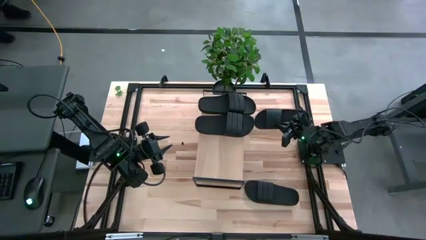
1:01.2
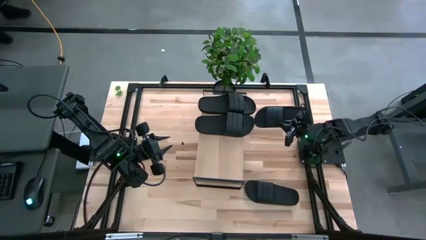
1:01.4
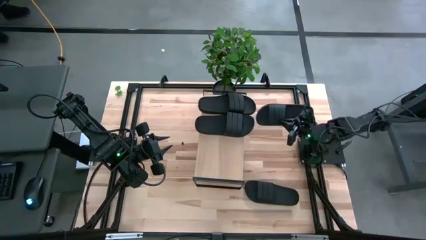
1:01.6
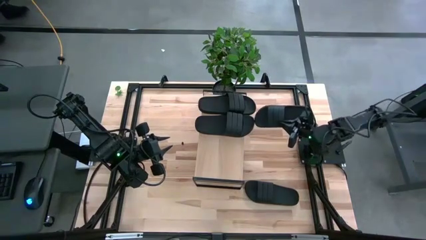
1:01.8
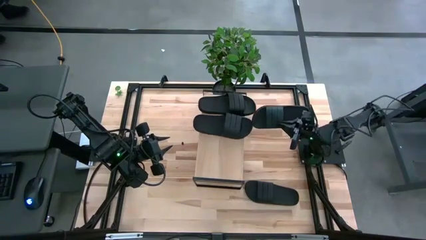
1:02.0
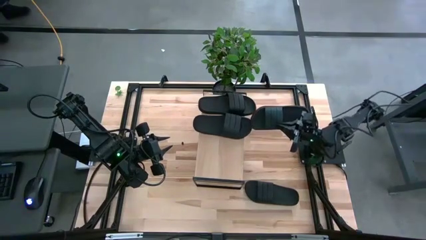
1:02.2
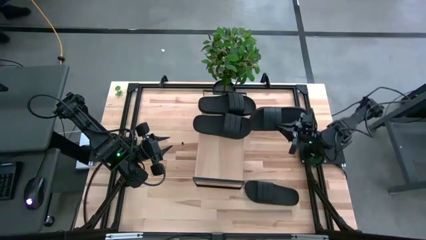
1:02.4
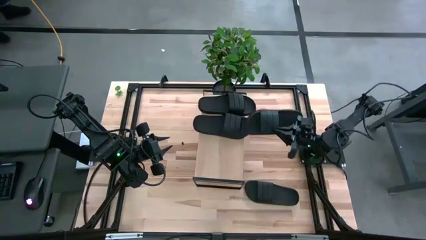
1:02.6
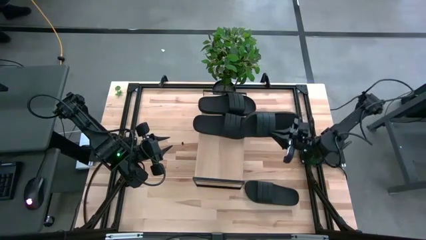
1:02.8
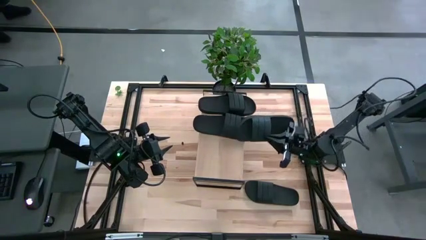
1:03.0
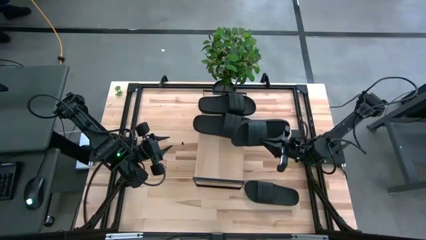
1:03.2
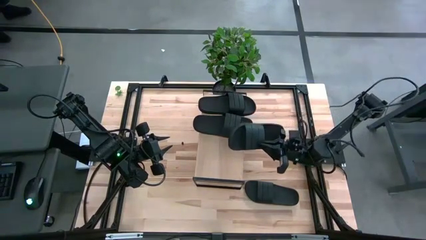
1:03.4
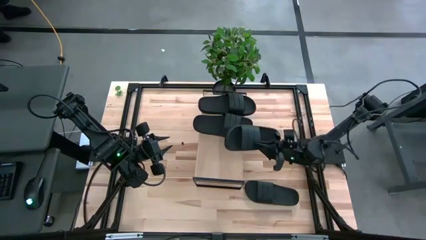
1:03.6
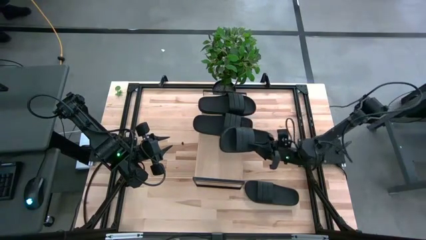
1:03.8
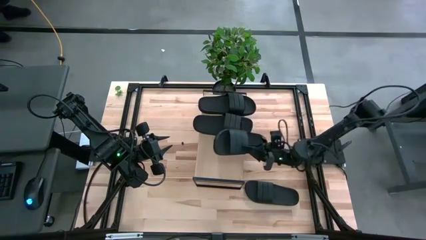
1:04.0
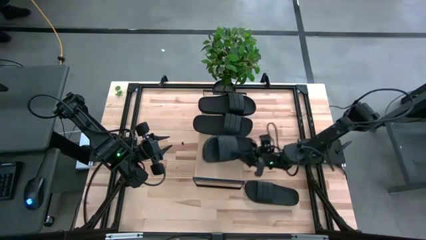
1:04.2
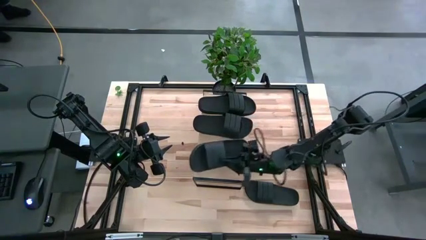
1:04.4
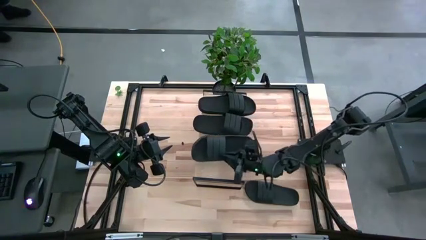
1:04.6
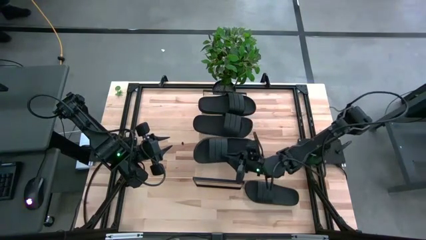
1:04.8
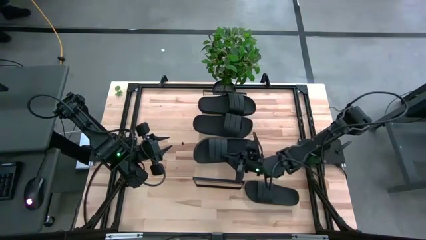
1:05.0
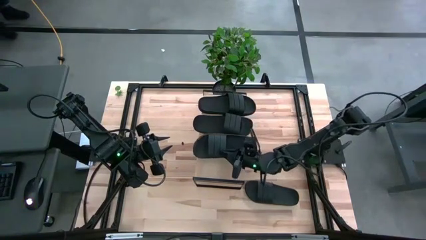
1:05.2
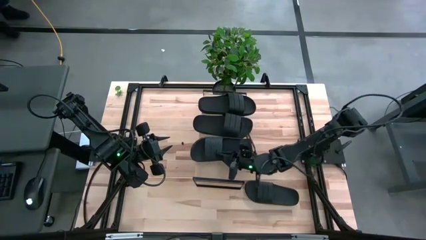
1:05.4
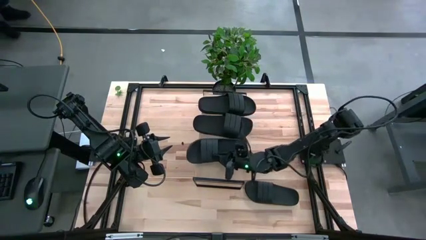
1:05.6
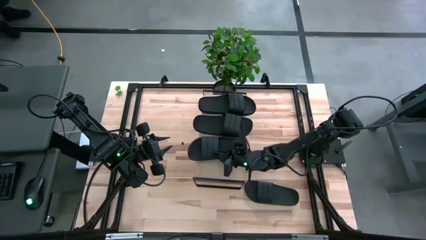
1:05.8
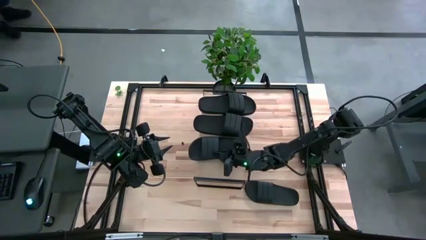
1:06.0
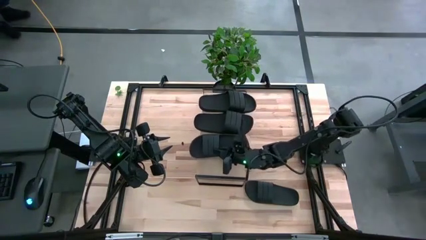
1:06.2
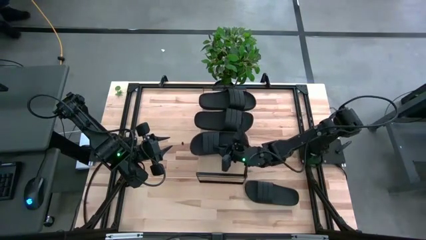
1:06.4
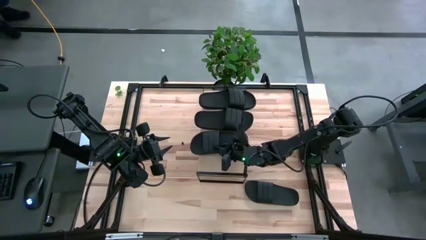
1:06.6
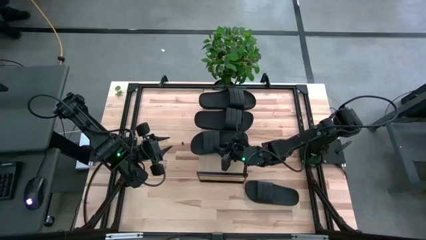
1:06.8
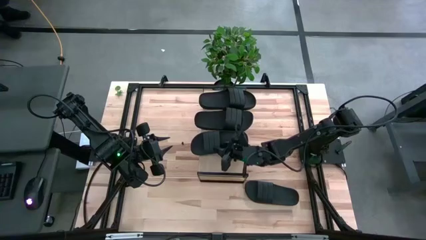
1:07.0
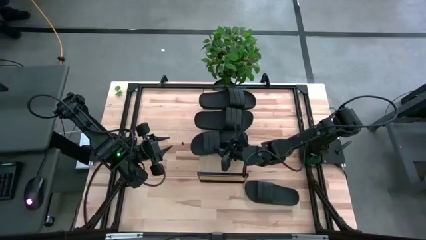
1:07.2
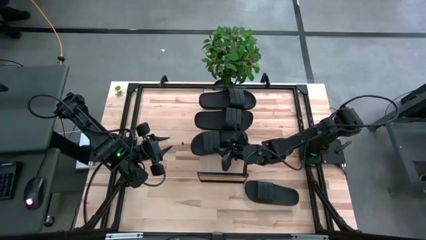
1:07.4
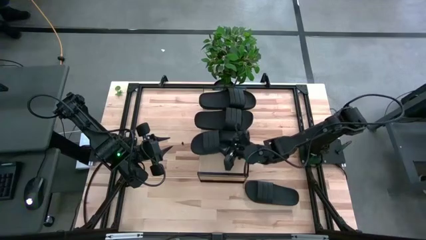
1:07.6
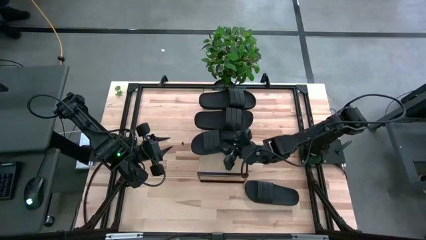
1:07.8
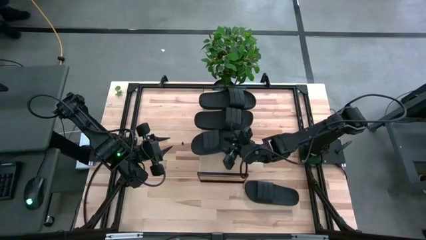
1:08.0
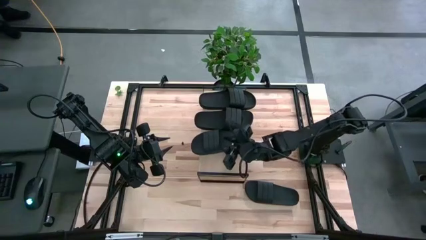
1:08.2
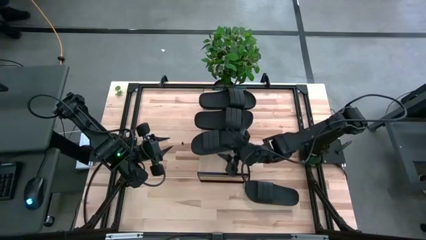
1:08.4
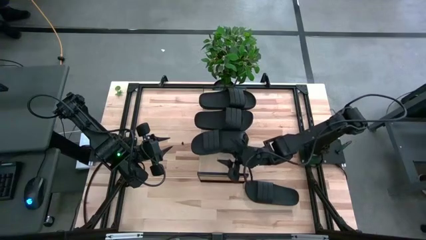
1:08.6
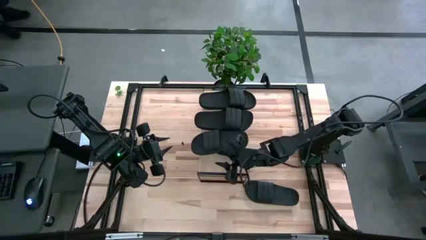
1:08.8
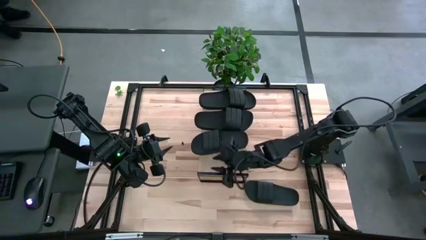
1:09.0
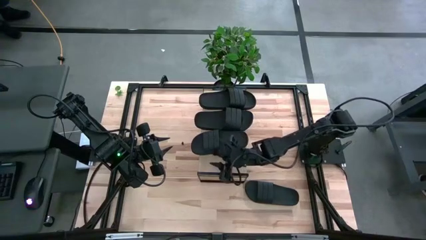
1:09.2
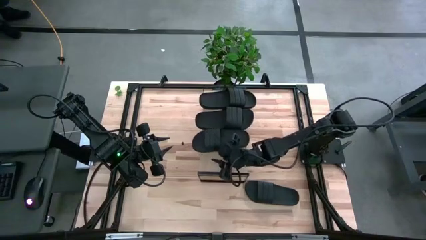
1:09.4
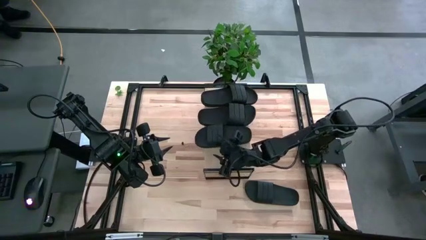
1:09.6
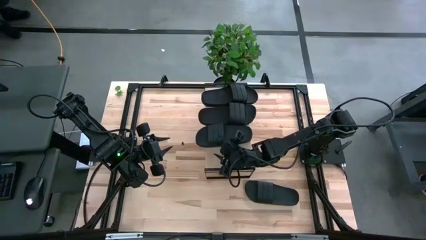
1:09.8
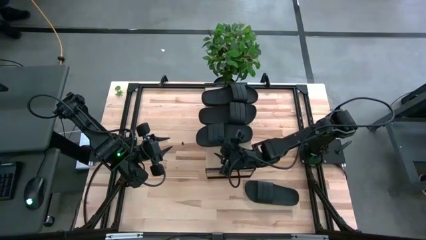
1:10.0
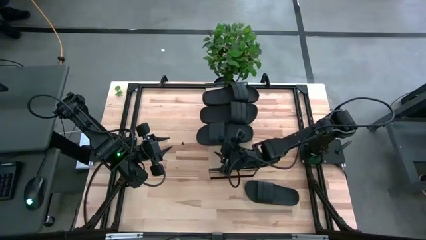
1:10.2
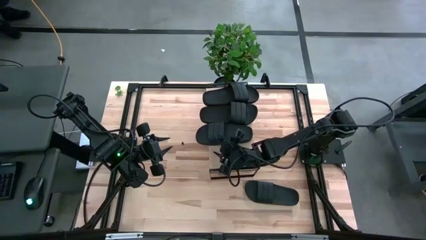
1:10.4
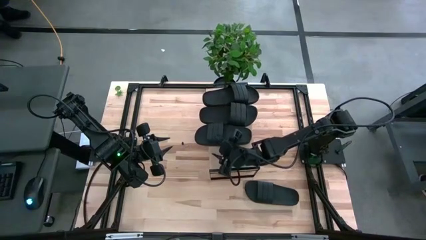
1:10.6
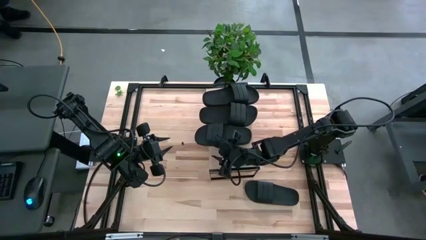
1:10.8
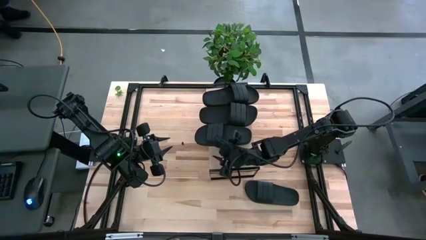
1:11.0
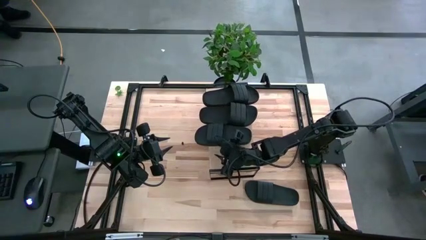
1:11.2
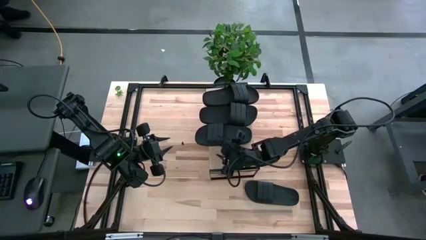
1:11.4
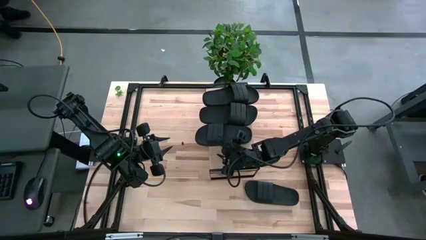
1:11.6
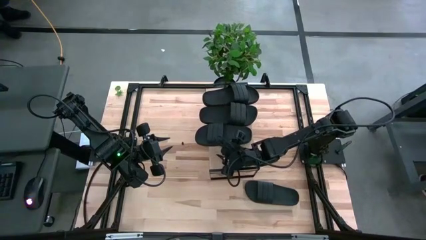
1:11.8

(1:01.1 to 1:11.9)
Task: Pick and place slides into the shelf
Put the top slide on the shelf

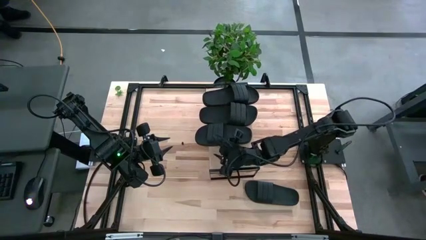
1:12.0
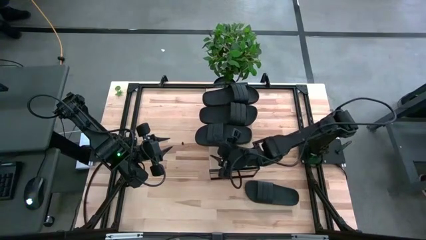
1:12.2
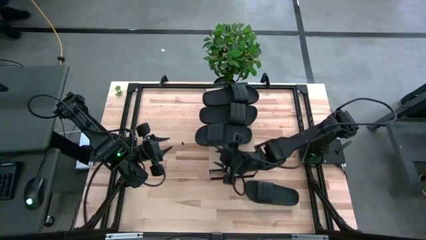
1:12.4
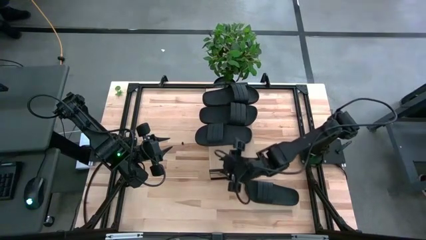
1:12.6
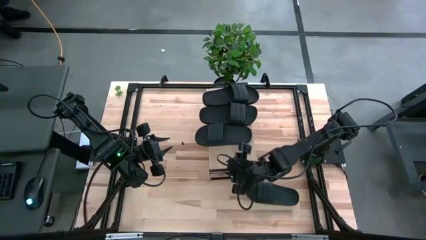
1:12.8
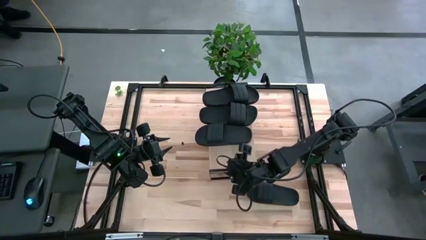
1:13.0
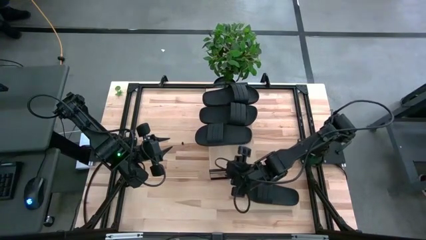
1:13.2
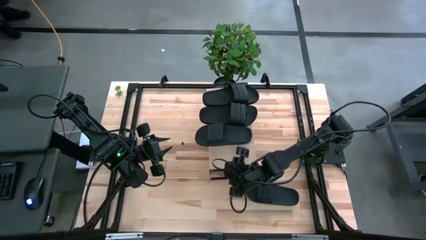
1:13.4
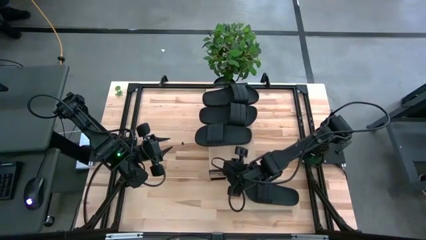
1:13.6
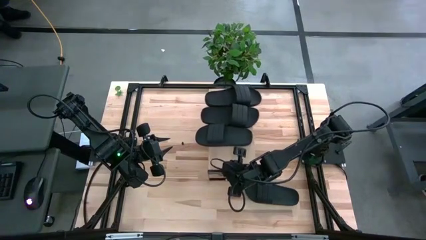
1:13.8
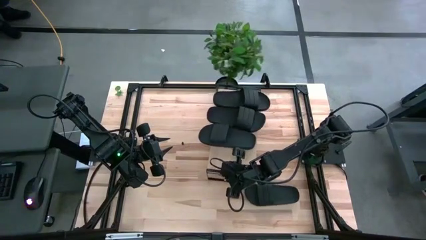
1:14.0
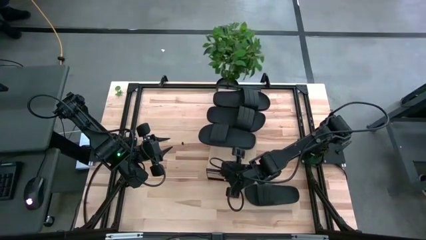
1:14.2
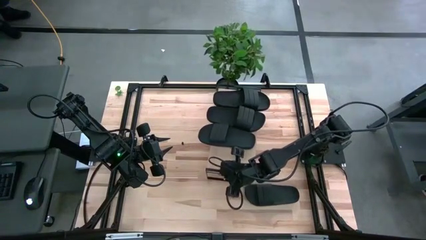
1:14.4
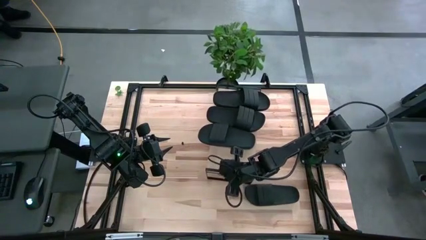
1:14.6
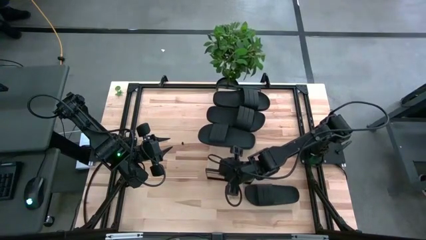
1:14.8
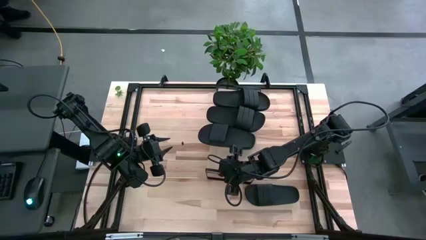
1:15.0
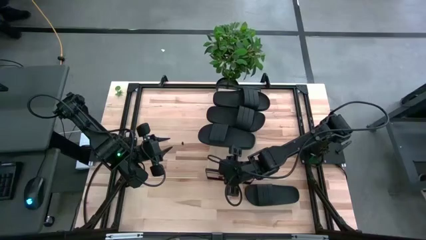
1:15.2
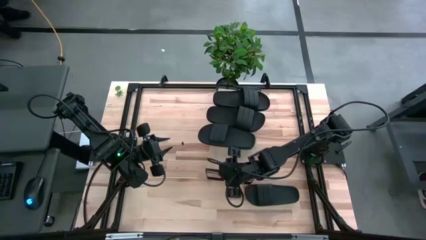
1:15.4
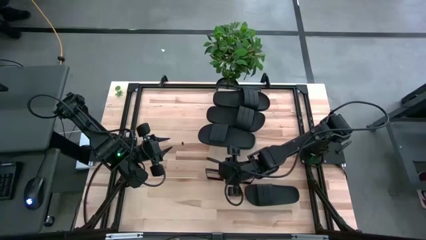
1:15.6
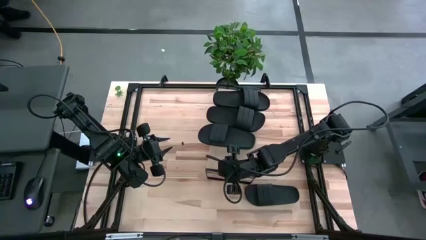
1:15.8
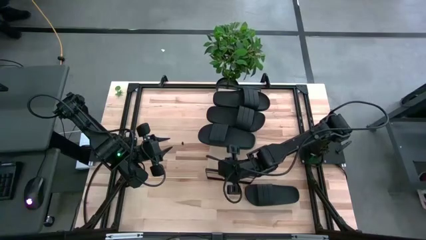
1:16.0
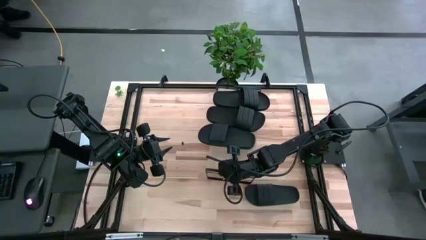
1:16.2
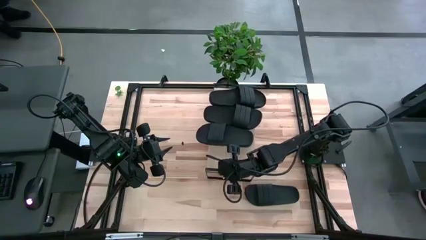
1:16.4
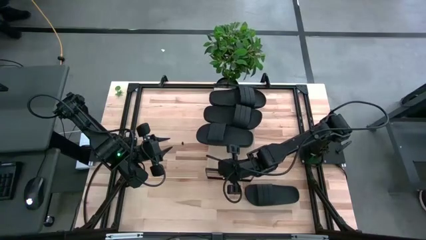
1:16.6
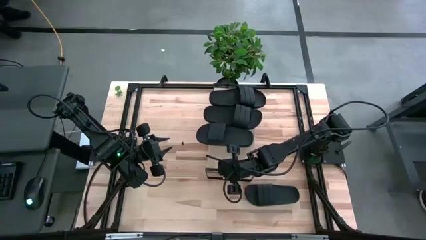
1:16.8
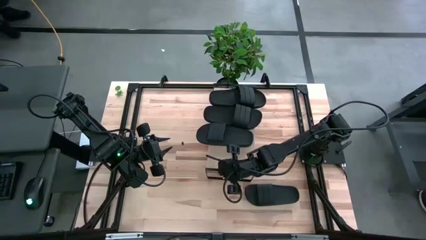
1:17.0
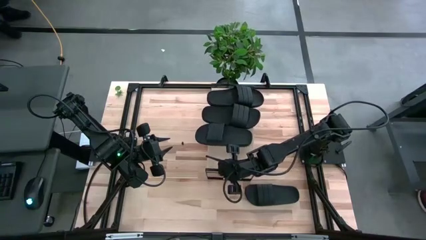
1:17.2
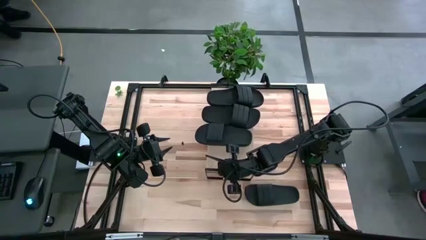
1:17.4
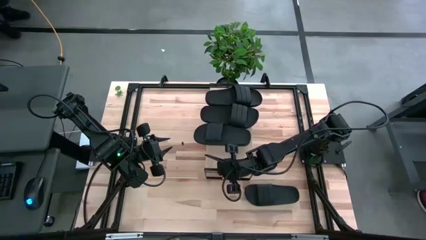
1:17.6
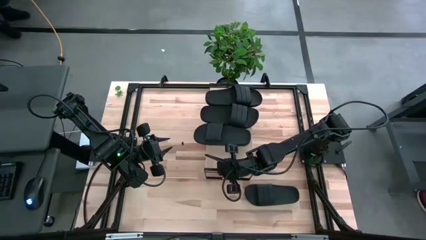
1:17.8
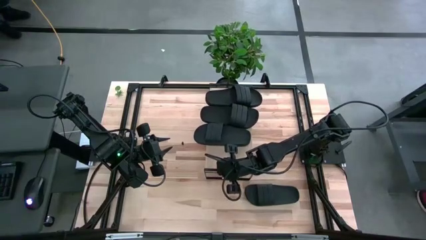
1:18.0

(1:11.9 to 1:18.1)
Adjust the shelf on the table
